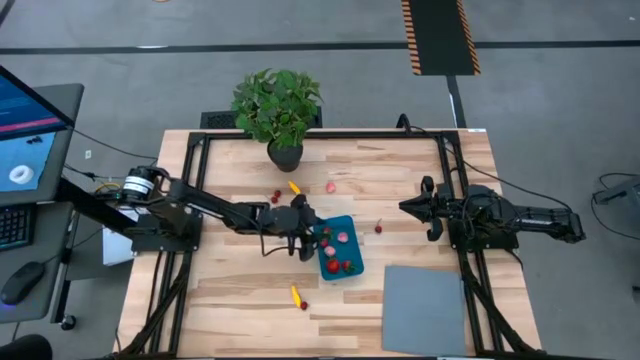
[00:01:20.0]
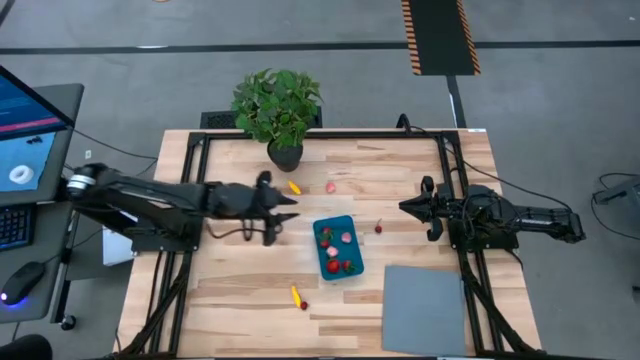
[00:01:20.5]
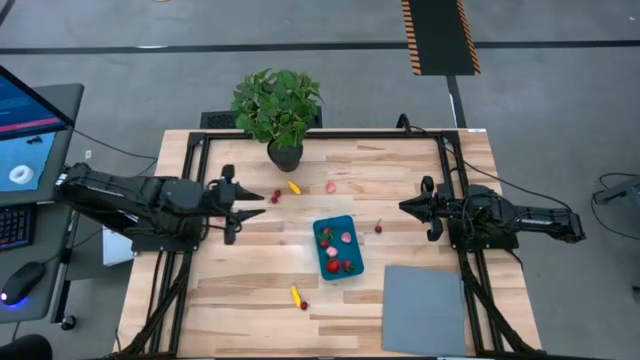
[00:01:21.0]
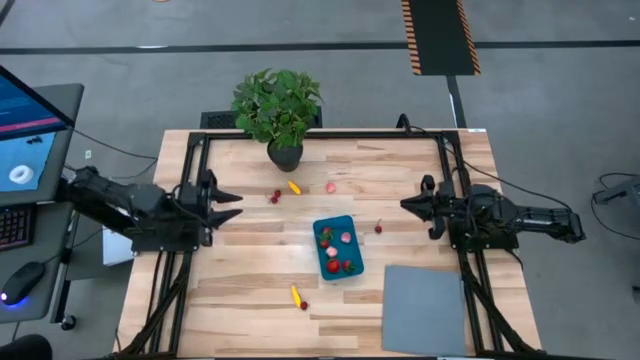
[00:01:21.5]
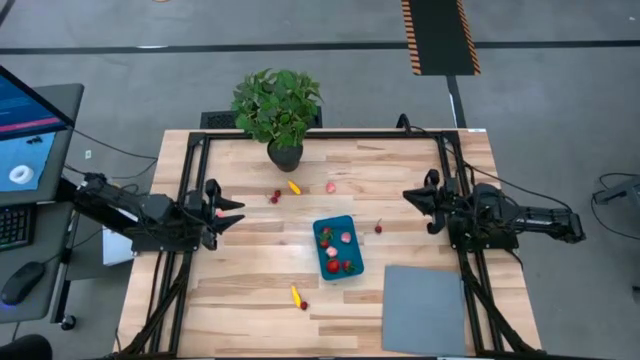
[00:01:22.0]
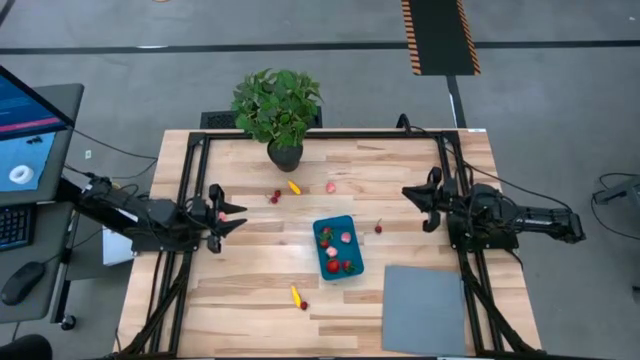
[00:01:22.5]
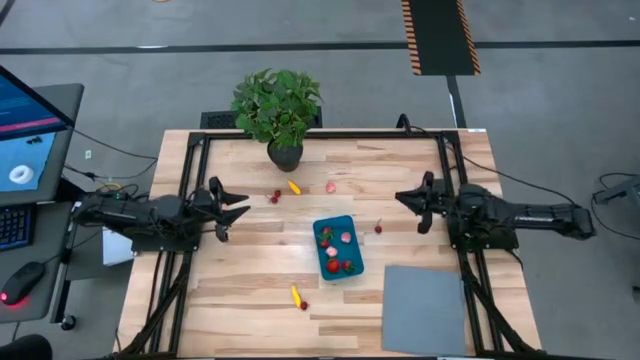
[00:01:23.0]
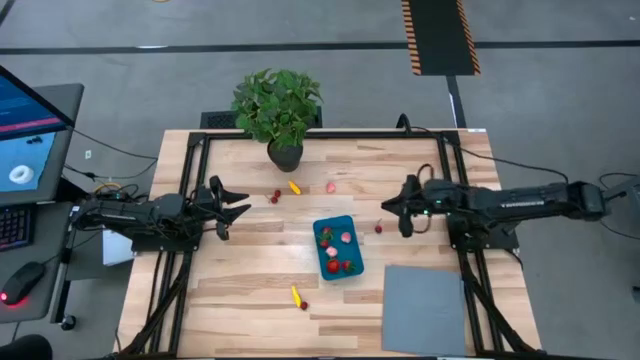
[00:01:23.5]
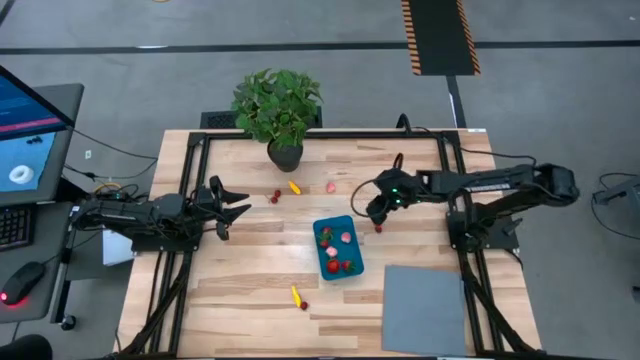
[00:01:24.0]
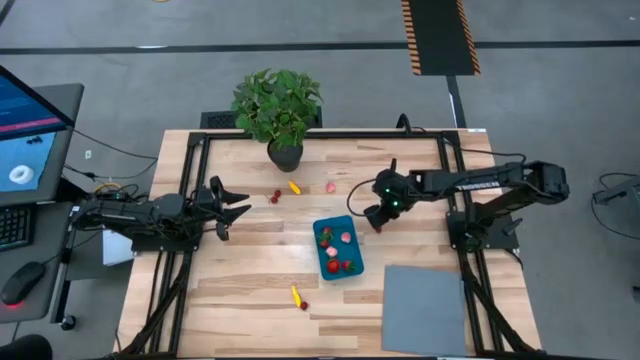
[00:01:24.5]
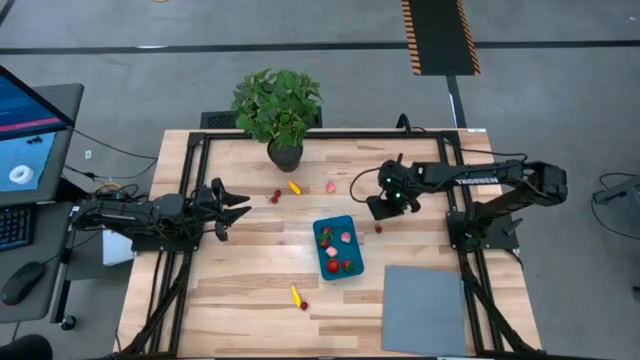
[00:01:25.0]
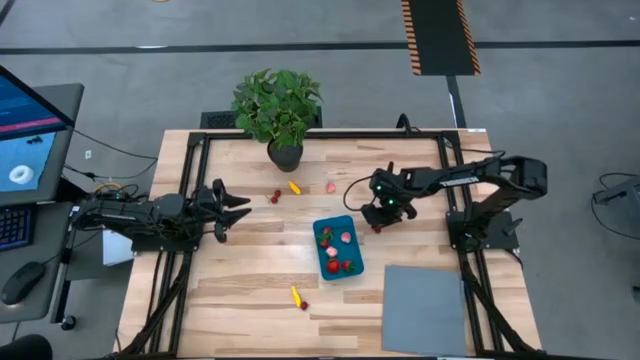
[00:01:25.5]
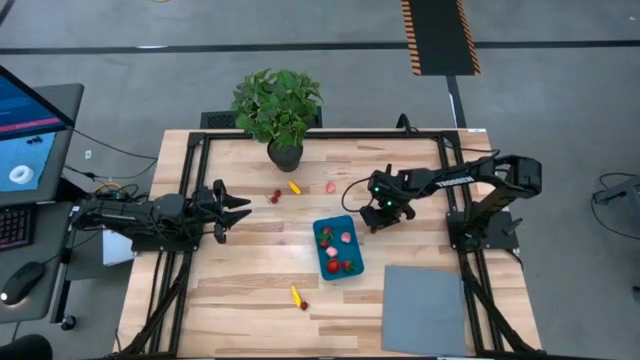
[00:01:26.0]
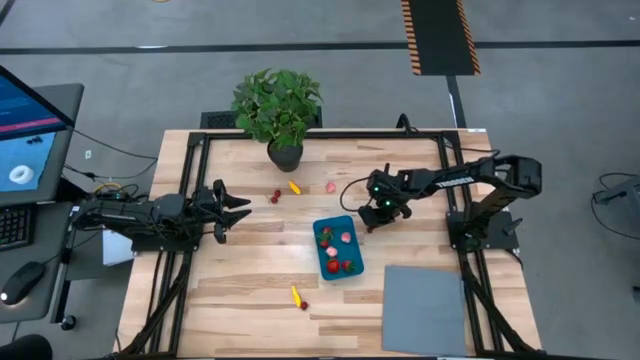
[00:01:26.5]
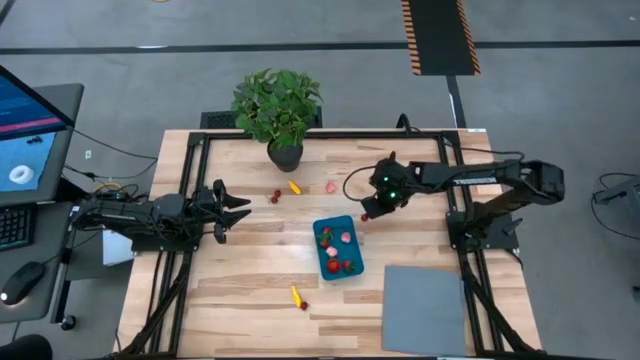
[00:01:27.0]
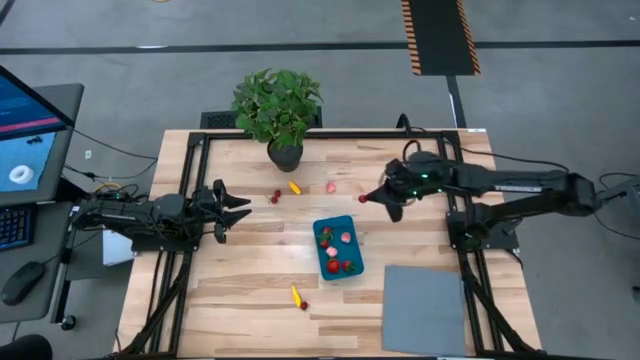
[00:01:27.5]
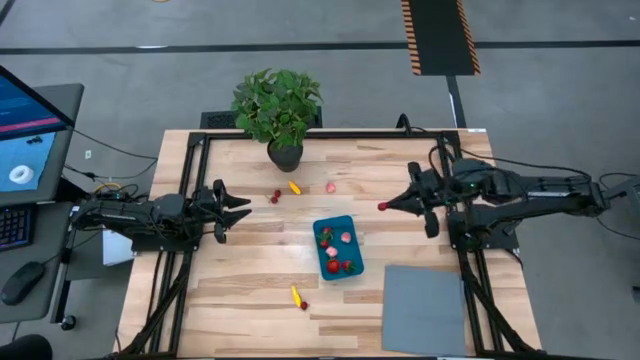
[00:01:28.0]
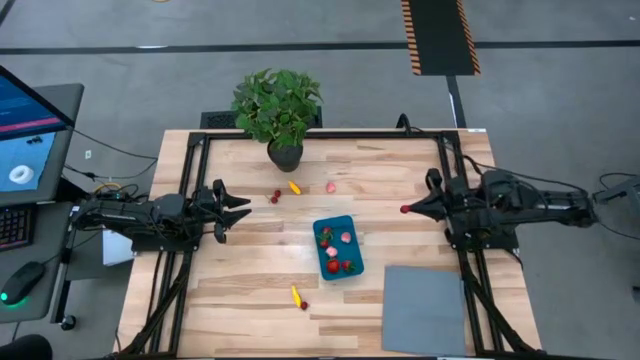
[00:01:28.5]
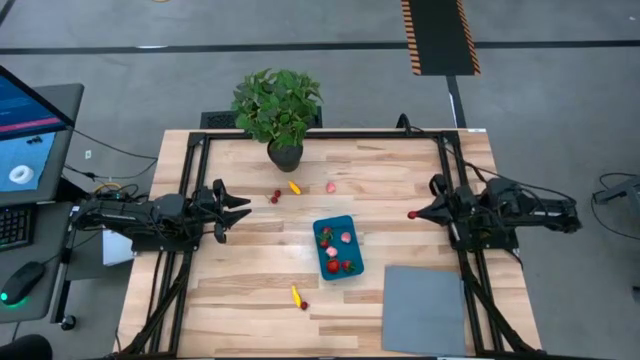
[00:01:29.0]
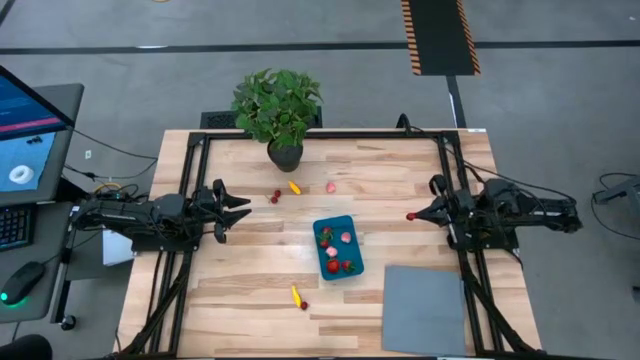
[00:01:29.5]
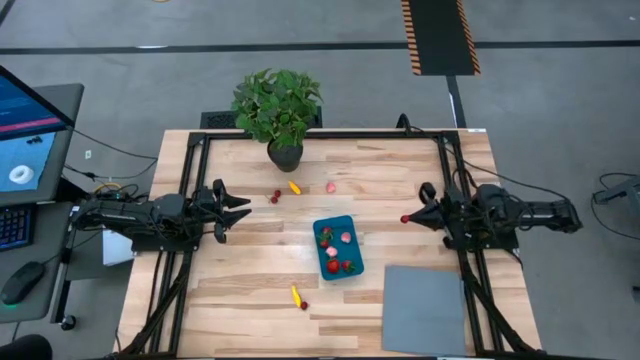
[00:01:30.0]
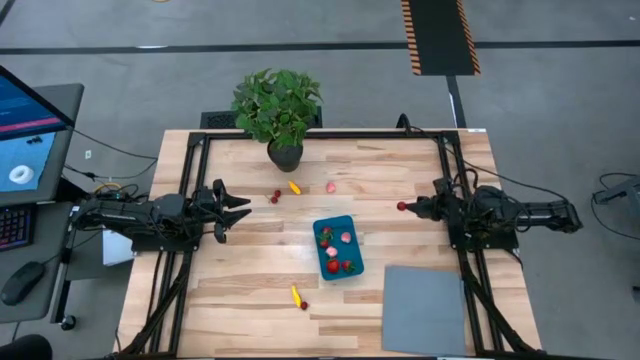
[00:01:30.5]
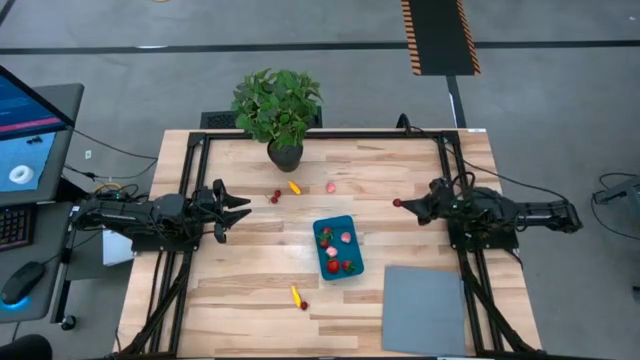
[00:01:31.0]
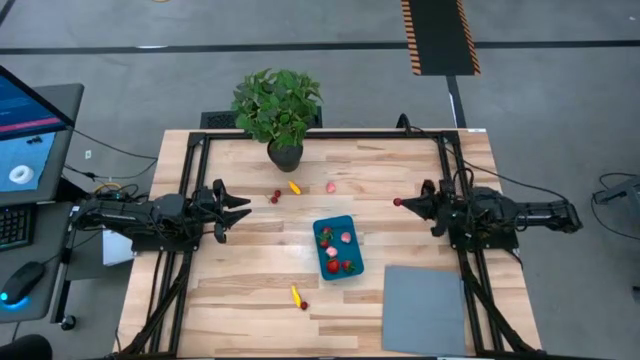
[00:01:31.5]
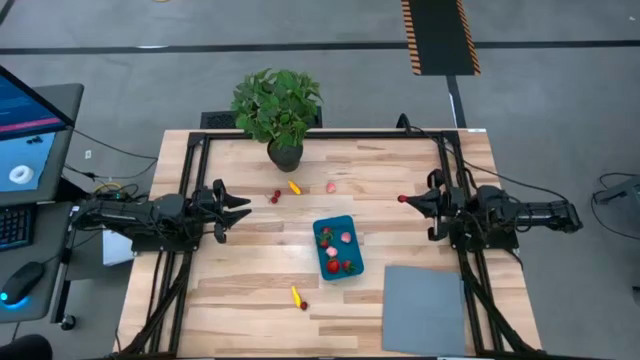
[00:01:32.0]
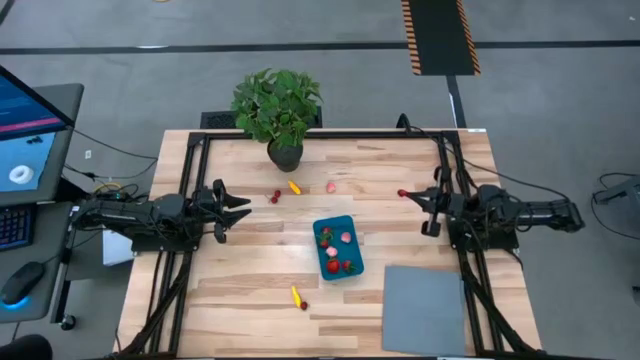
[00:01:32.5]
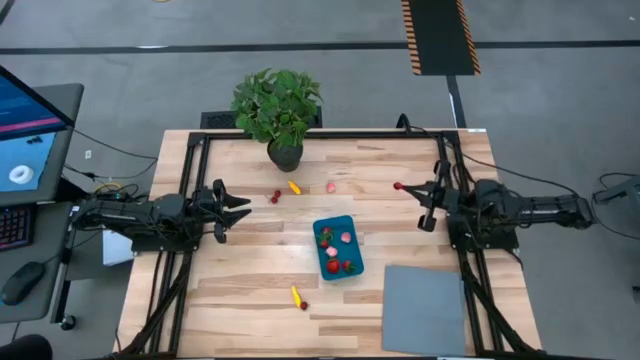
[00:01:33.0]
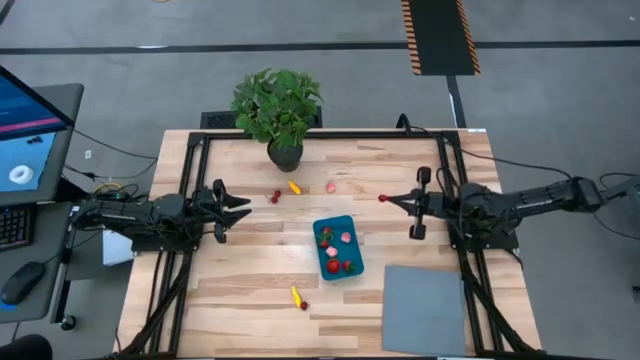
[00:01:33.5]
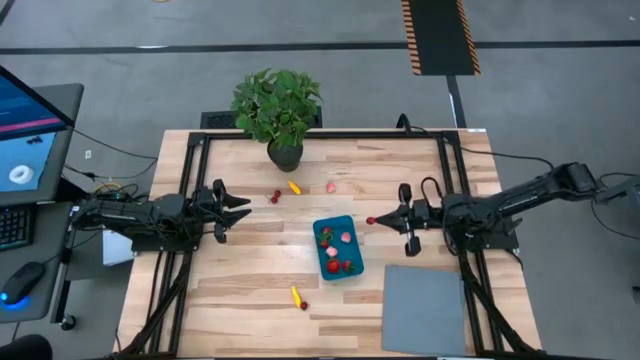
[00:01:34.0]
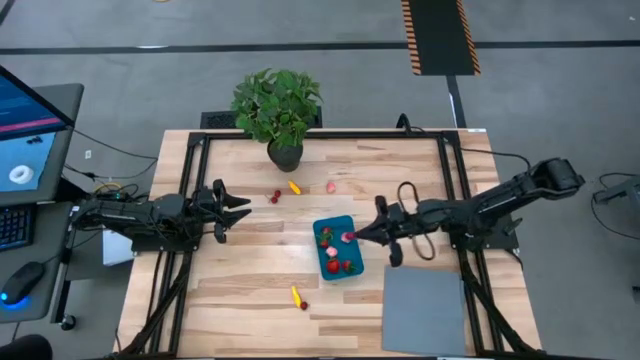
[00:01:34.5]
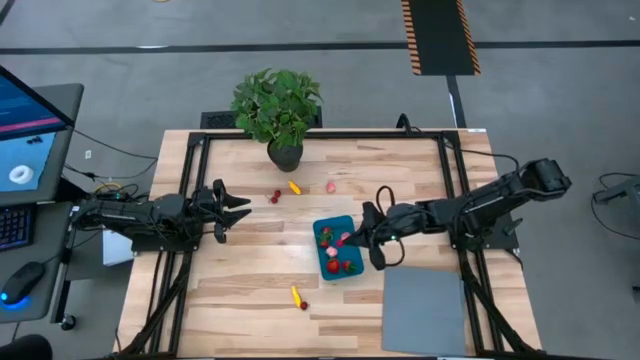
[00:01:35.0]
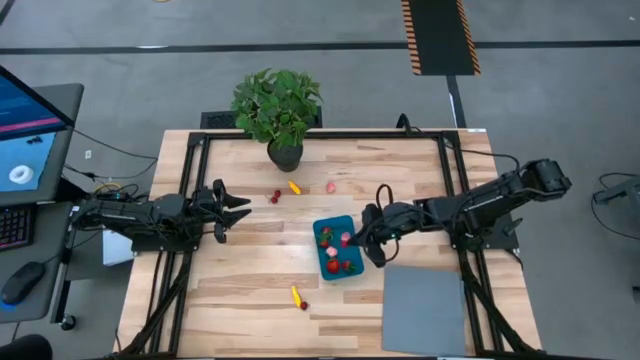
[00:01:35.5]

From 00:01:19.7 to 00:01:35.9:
Task: Pick and placing Produce into tupperware
Put the cherry into the blue bin

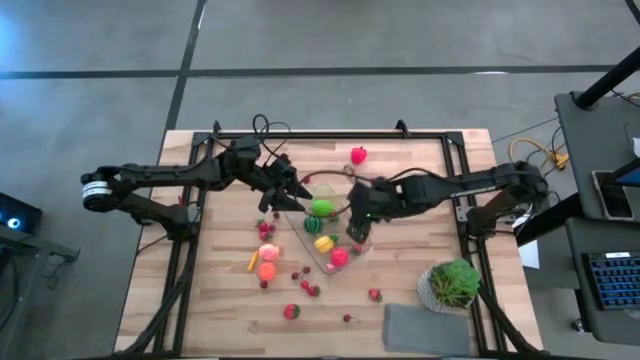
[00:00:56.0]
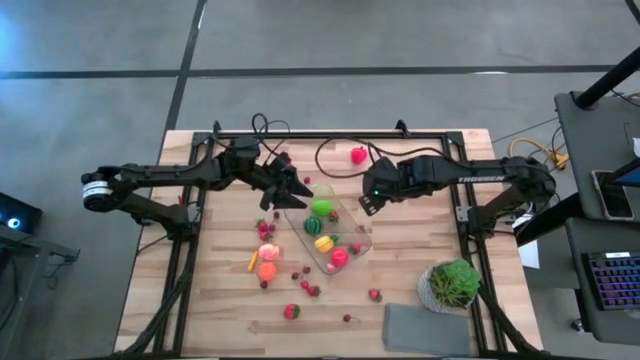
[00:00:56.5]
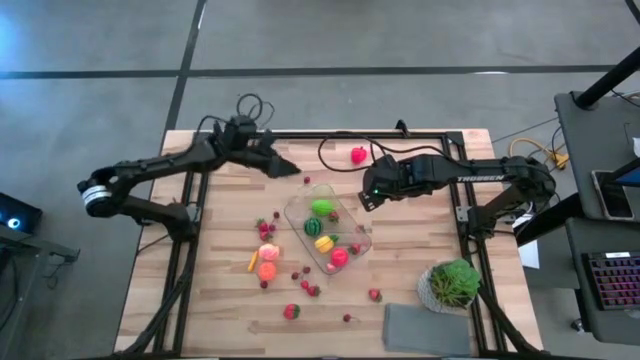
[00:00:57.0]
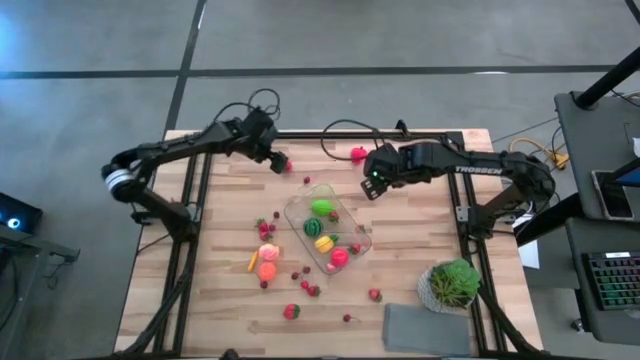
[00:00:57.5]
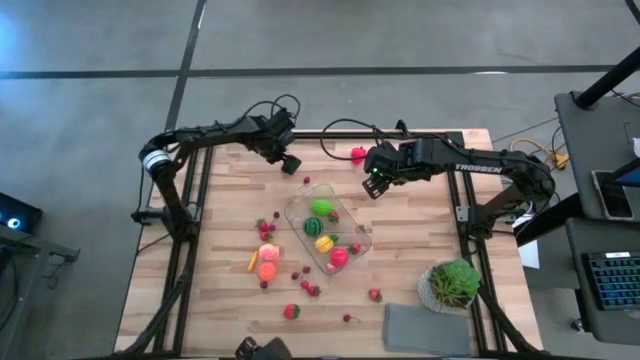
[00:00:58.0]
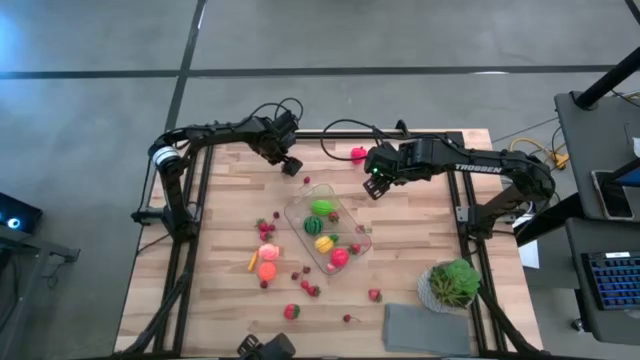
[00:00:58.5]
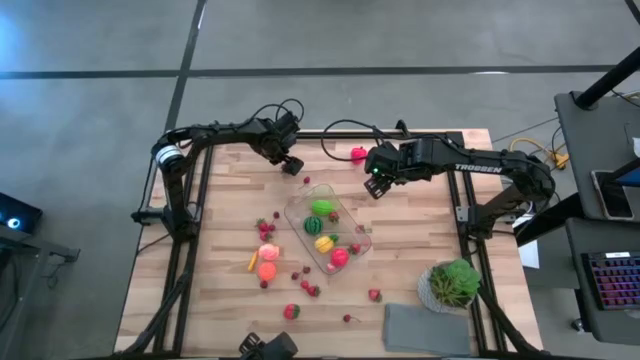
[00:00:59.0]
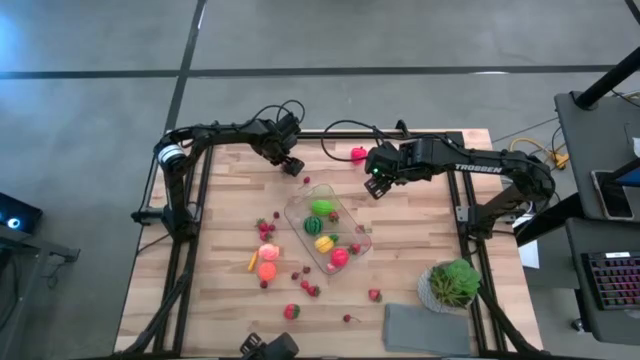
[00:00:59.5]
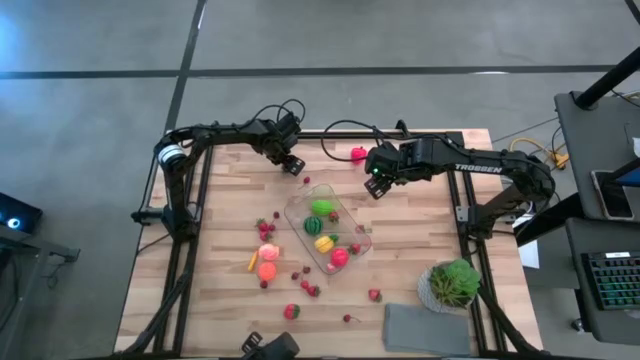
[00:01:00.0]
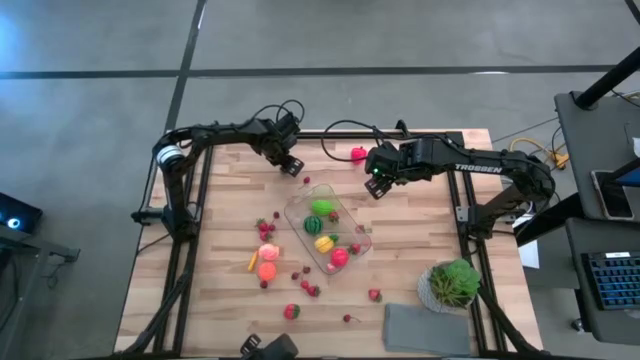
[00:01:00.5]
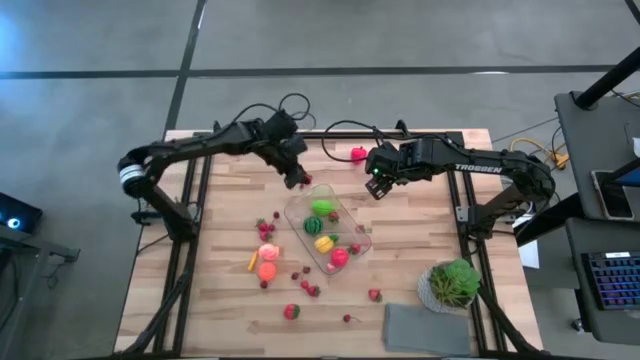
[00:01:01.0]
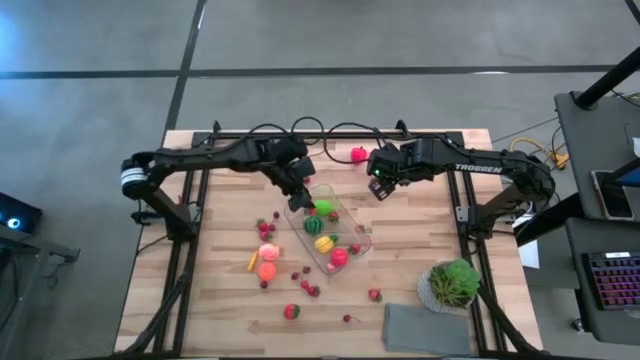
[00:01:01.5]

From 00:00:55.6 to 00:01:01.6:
Task: Pick and placing Produce into tupperware
Put the red strawberry into the transparent bin
